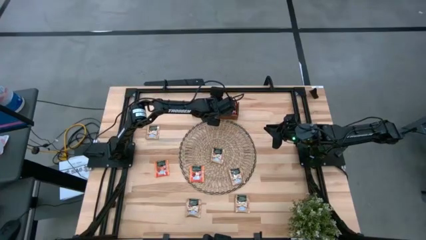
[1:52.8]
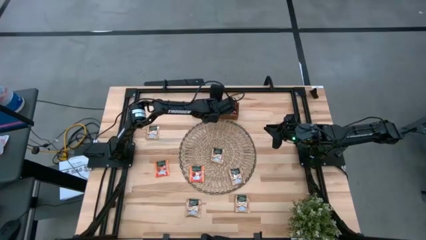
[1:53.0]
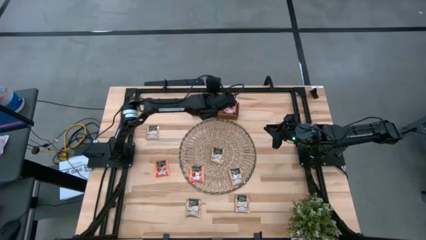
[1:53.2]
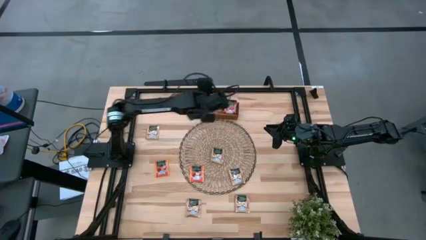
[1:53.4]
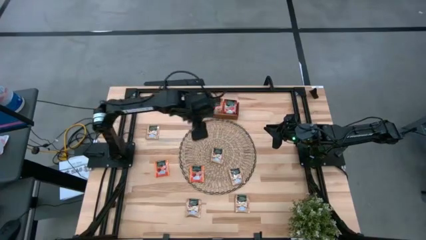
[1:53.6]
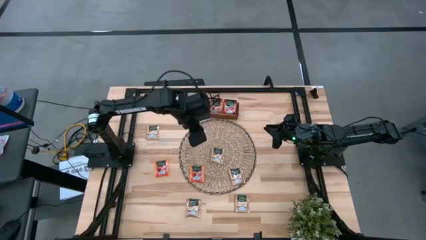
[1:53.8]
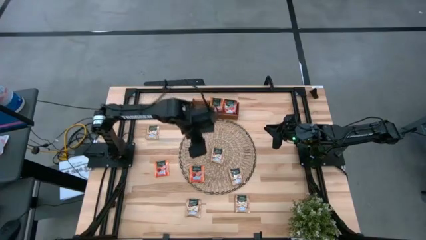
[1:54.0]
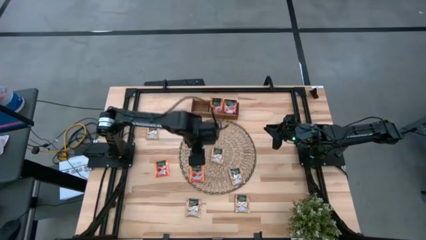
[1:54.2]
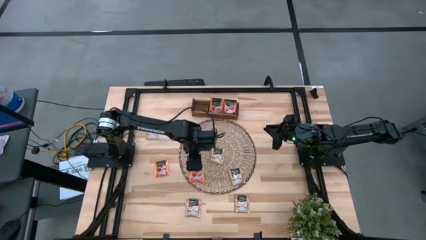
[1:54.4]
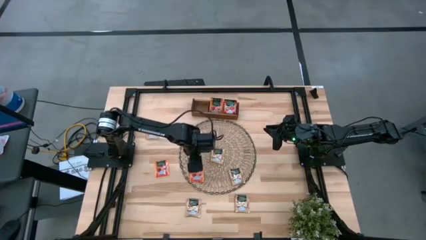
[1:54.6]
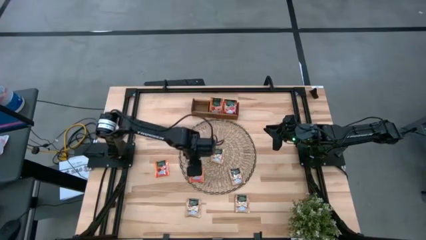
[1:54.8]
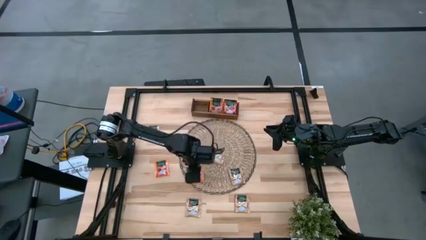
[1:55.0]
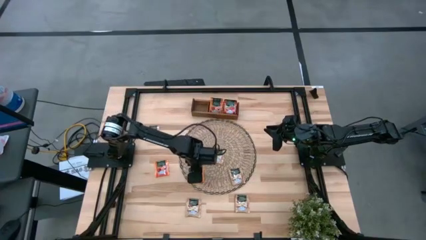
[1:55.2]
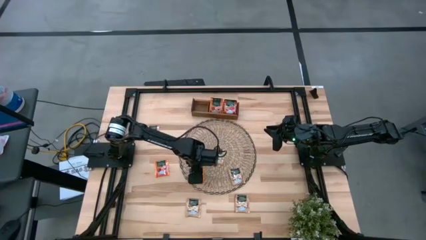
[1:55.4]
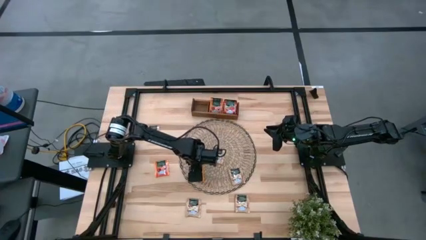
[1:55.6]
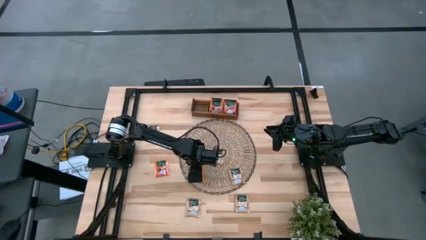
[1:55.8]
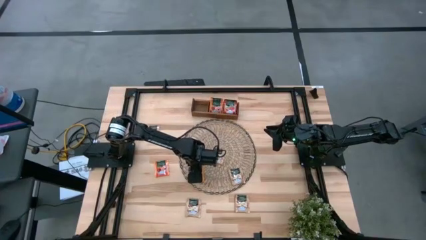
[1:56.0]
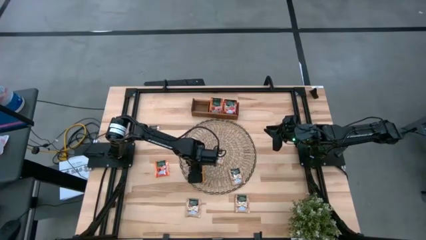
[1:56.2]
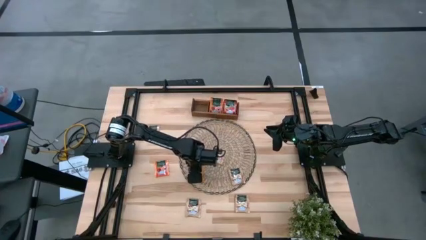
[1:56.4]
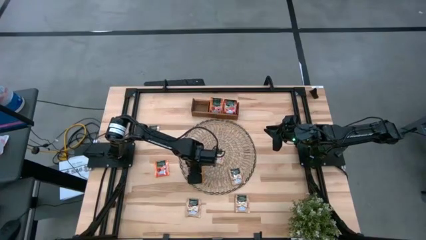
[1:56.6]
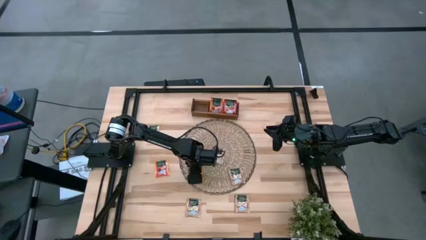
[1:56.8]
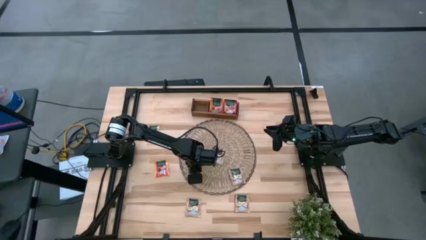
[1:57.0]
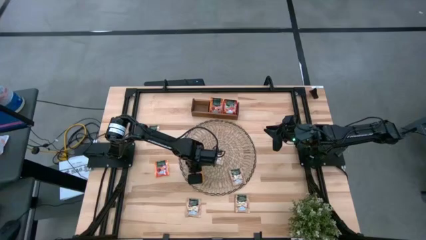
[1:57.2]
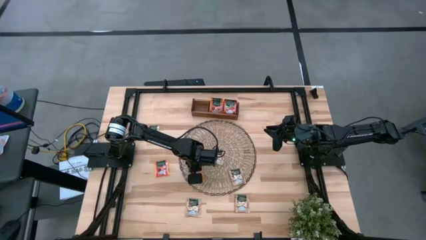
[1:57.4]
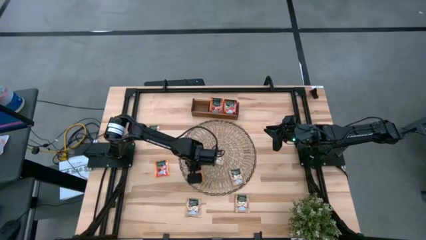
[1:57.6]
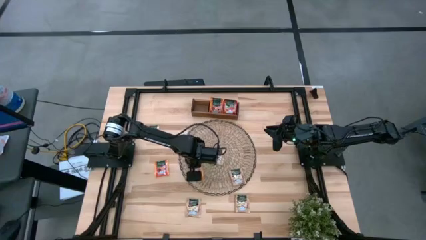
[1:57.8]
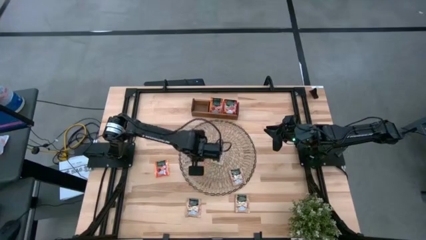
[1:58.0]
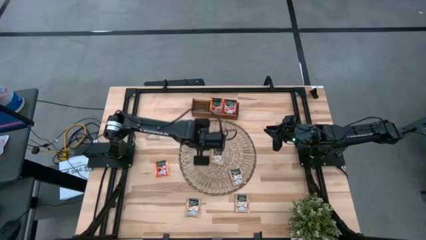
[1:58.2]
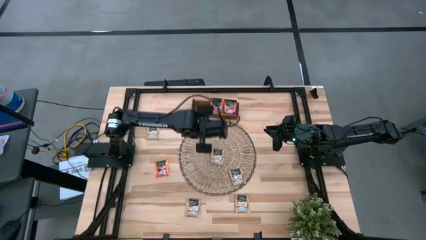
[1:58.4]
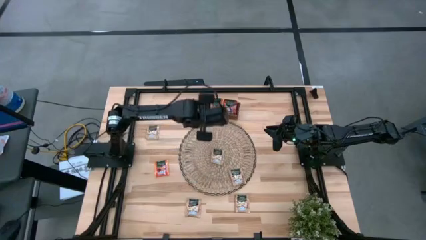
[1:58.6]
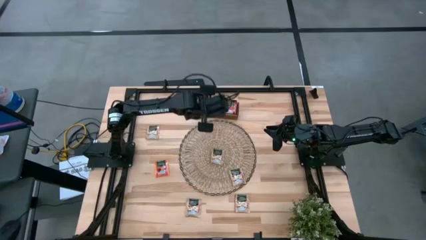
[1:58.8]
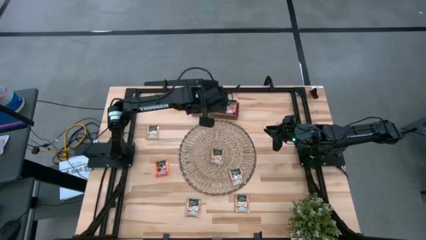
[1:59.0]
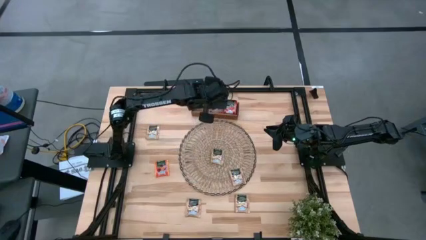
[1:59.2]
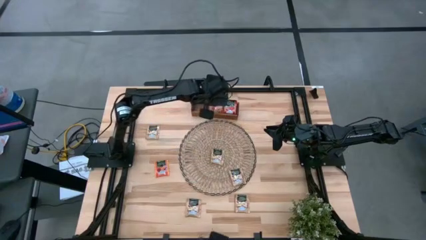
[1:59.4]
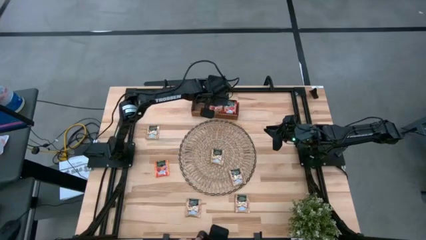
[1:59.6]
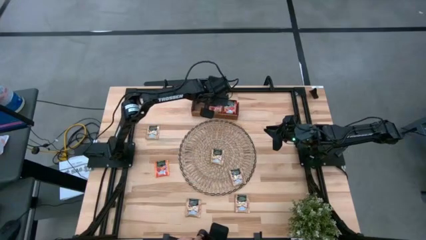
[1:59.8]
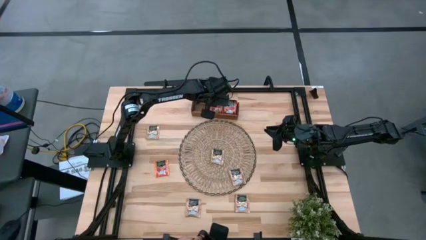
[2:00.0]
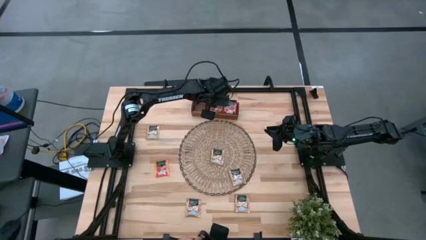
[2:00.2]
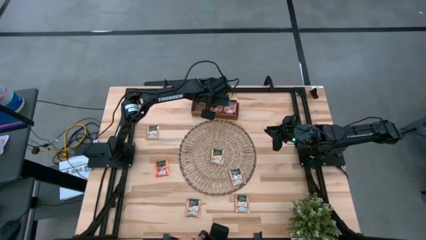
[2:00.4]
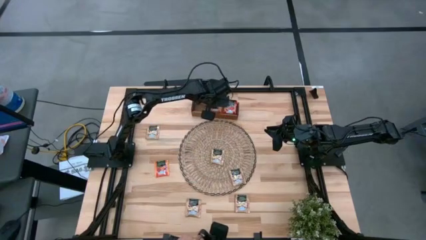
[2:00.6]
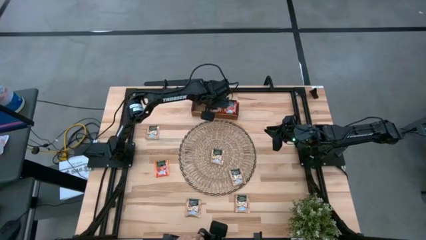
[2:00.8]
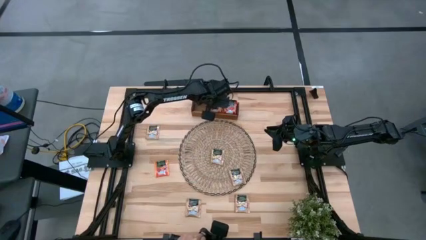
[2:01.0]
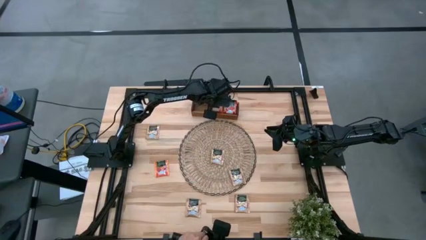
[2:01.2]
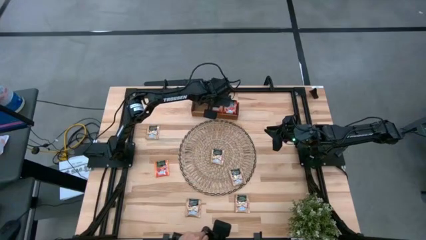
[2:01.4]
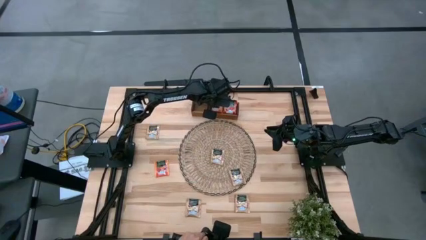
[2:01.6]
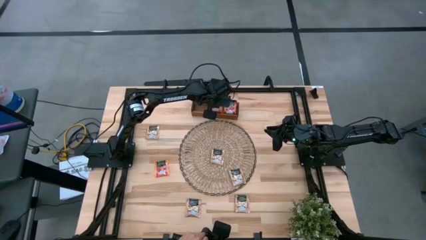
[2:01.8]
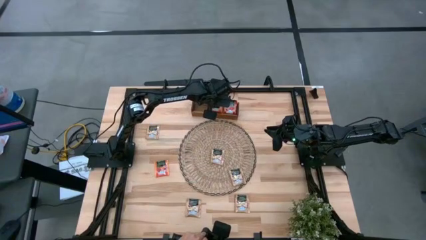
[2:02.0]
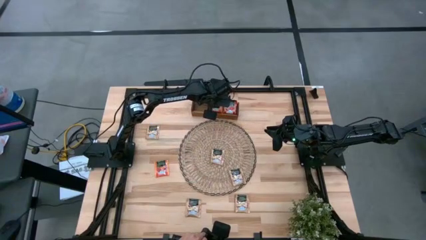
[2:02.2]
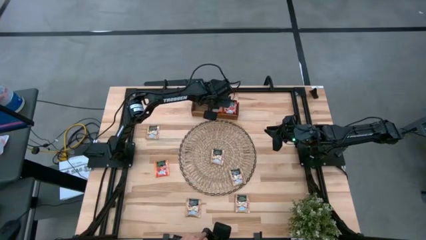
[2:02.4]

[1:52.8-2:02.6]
Task: Pick & Place Tea
Put the orange tea bag into the middle section of the wooden organizer
